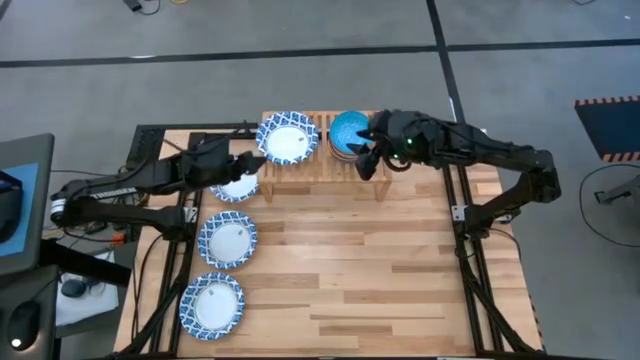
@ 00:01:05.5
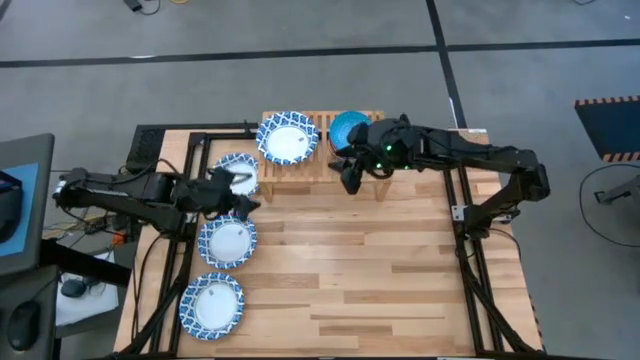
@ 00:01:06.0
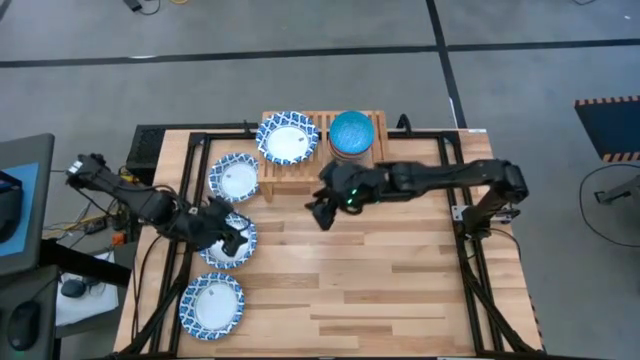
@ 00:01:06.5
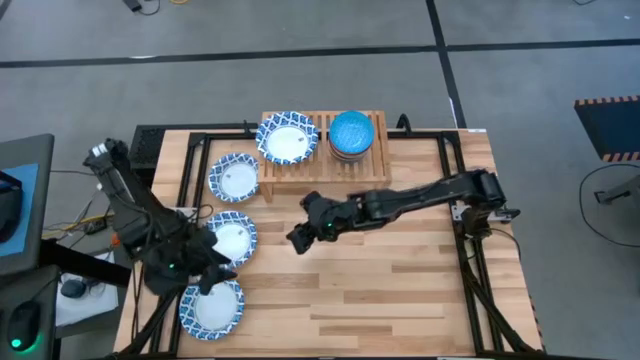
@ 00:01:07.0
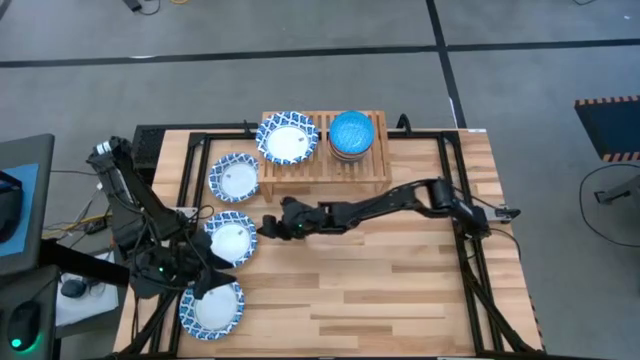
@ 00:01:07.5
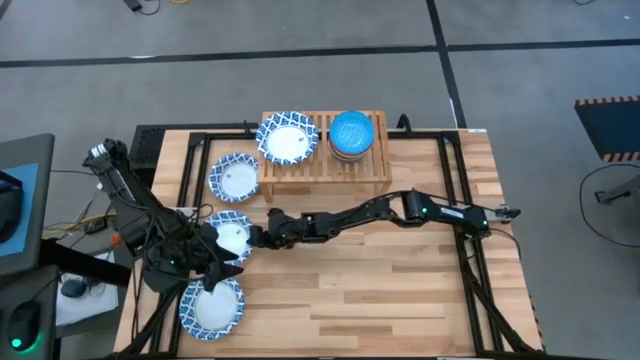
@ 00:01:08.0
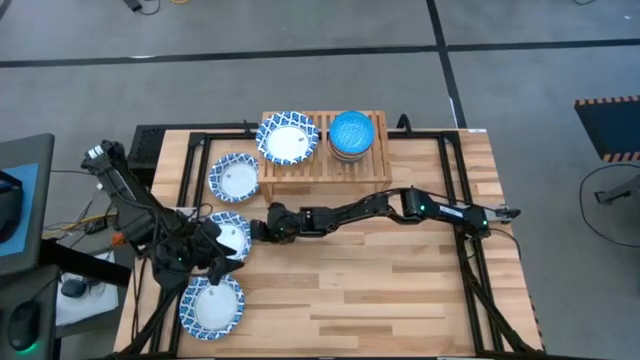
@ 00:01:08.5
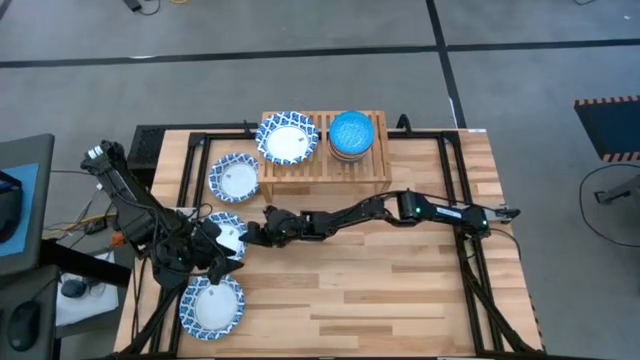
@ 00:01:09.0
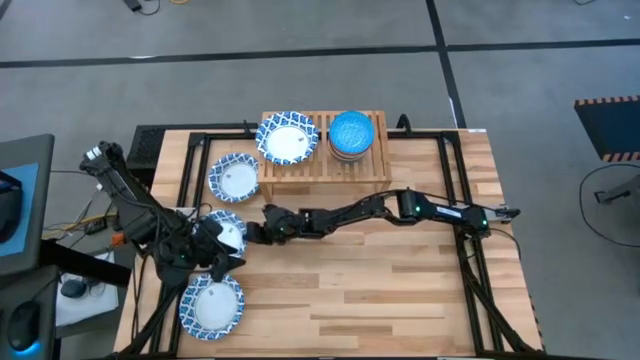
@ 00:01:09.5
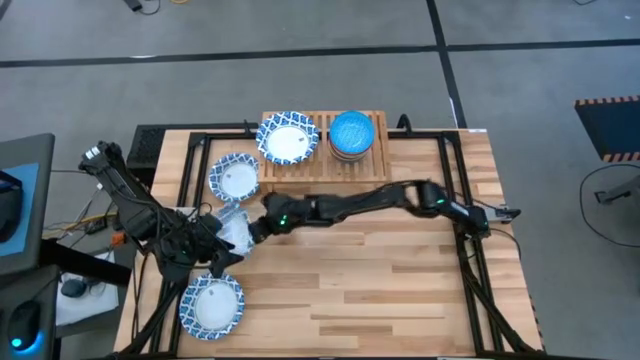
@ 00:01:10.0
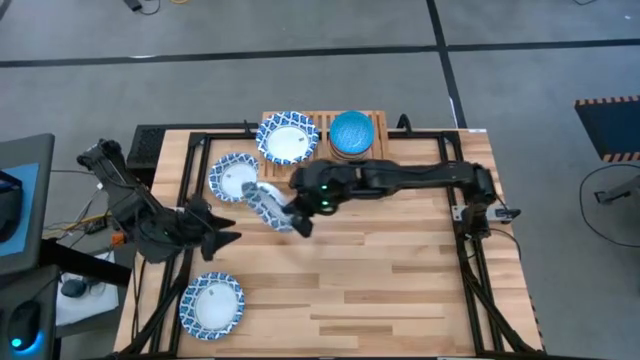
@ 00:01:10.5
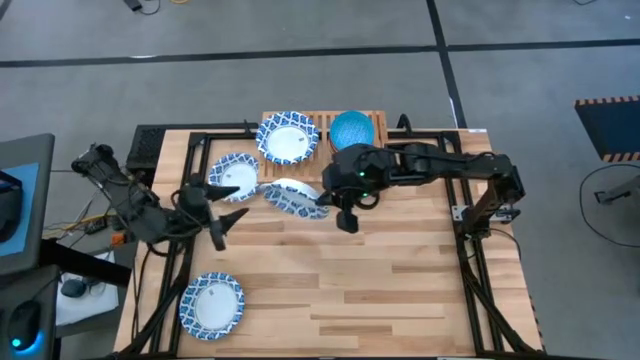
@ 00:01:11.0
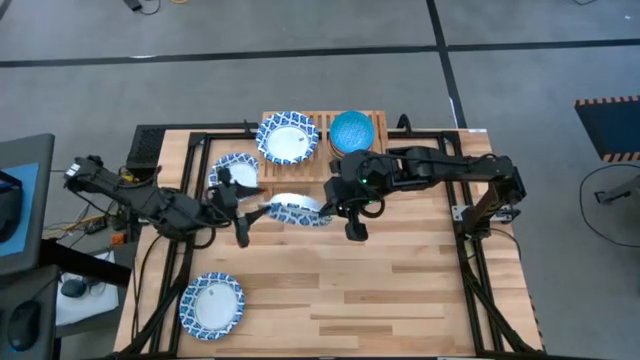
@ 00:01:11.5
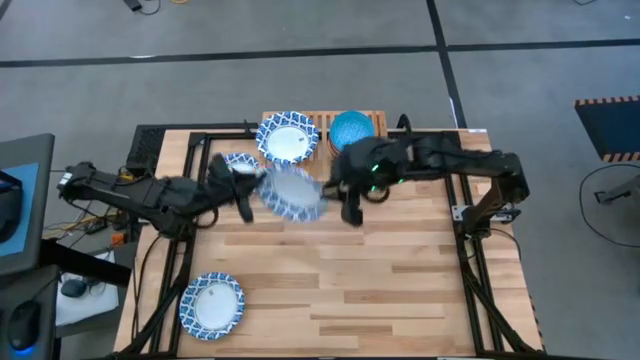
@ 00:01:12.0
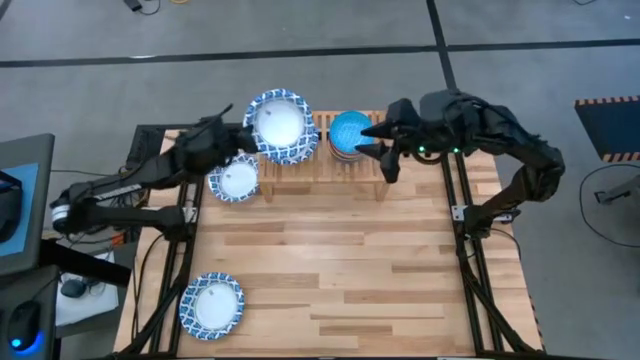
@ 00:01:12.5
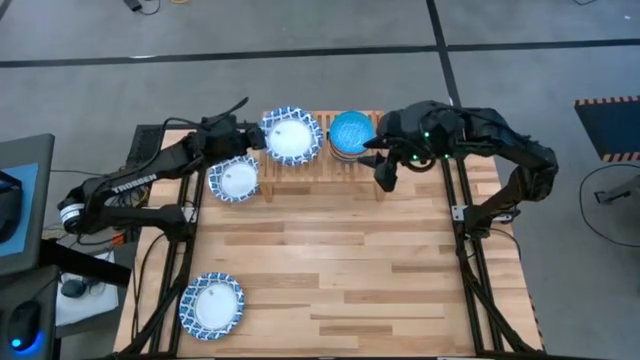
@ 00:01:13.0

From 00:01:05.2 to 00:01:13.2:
Task: Place and stack bowls onto a shelf
Stack the middle left white patterned bowl on top of the white patterned bowl on the shelf

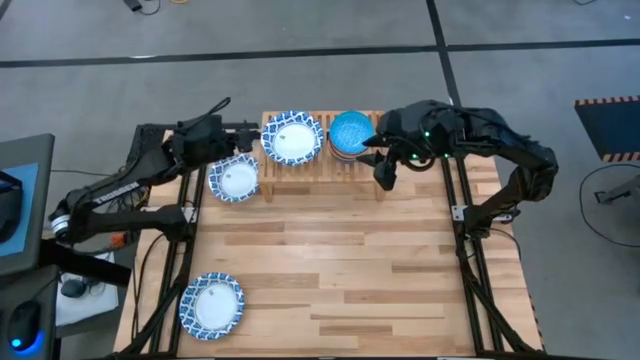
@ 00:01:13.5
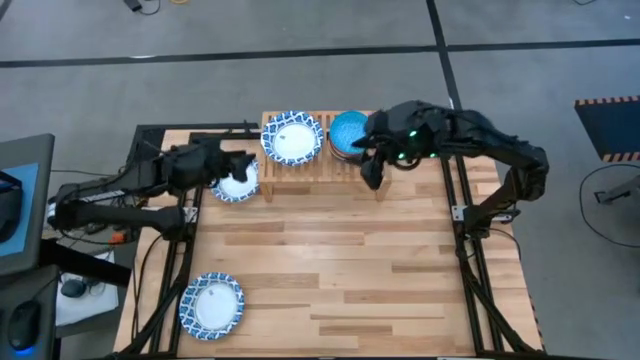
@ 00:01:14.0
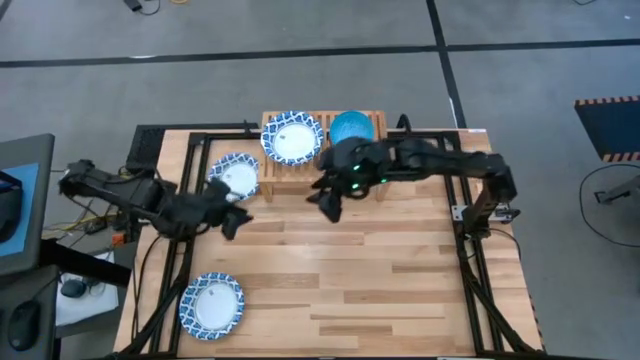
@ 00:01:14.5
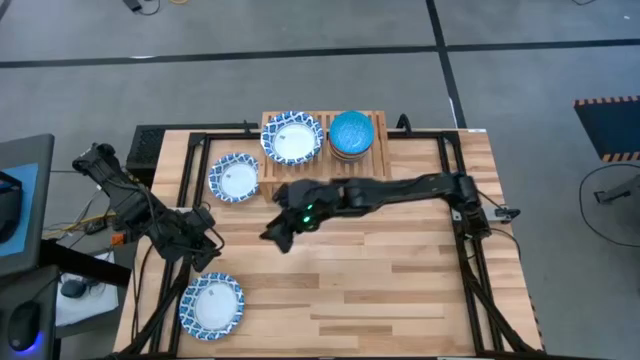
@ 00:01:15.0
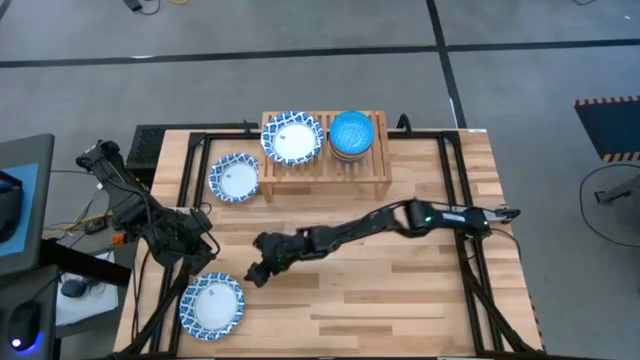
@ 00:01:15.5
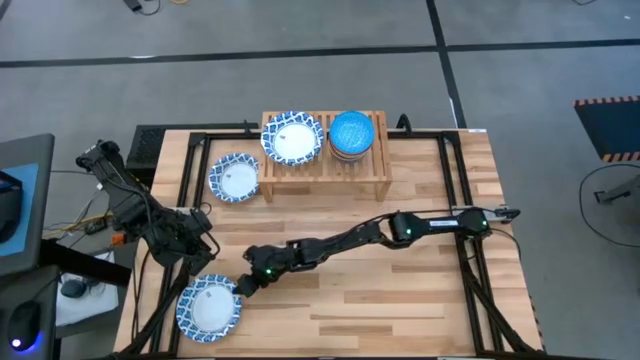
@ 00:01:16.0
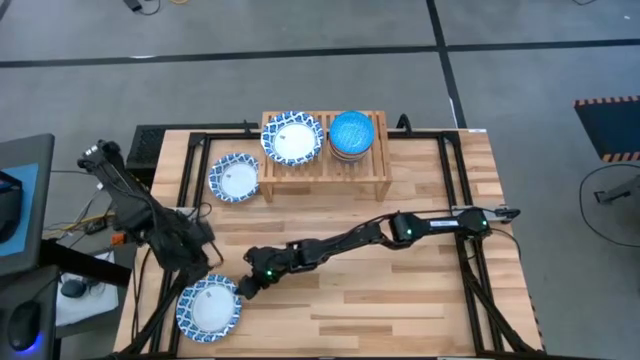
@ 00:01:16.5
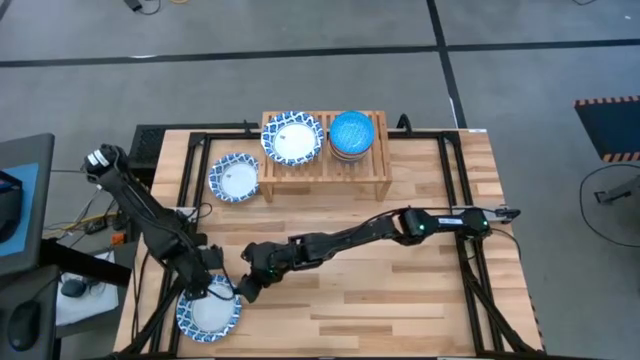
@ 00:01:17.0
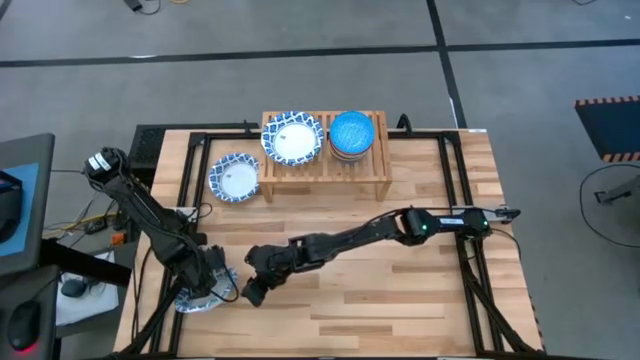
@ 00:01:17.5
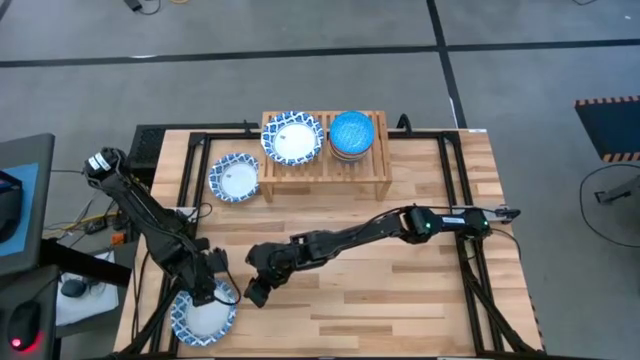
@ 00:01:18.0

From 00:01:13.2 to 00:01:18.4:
Stack the bottom white patterned bowl on top of the white patterned bowl on the shelf

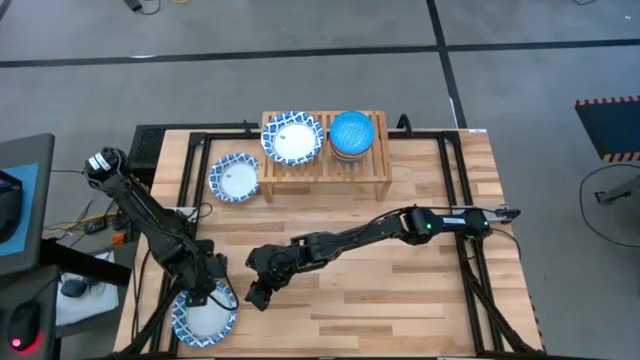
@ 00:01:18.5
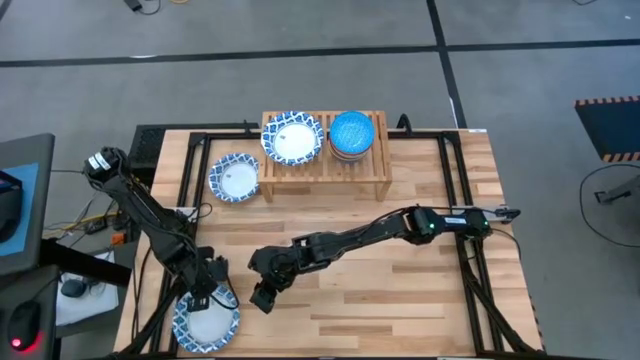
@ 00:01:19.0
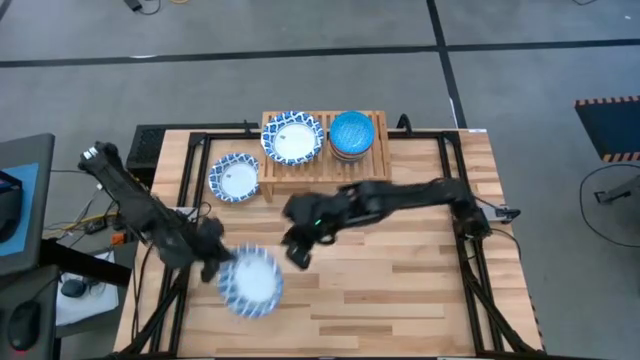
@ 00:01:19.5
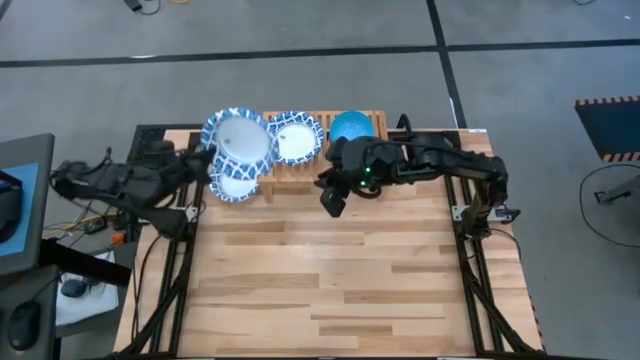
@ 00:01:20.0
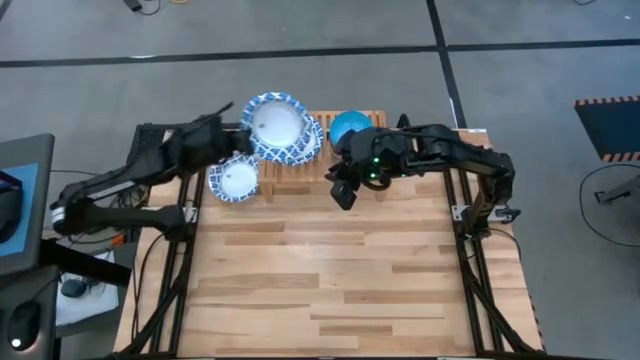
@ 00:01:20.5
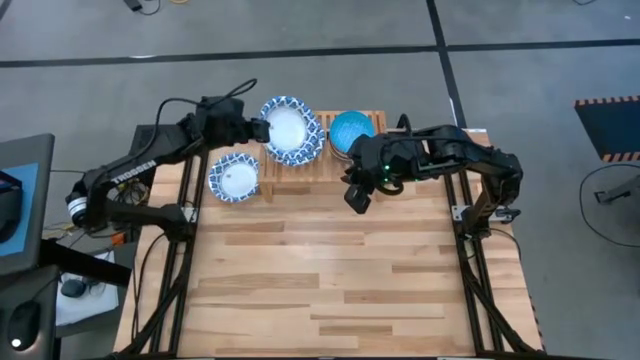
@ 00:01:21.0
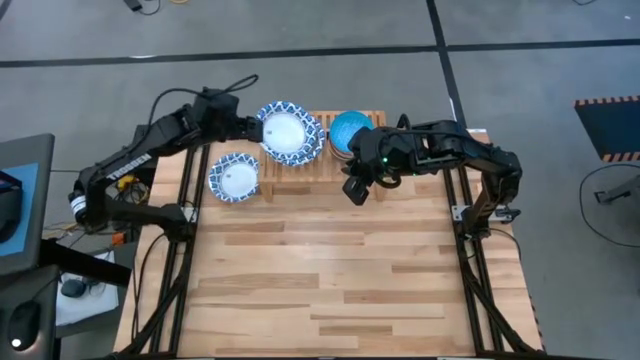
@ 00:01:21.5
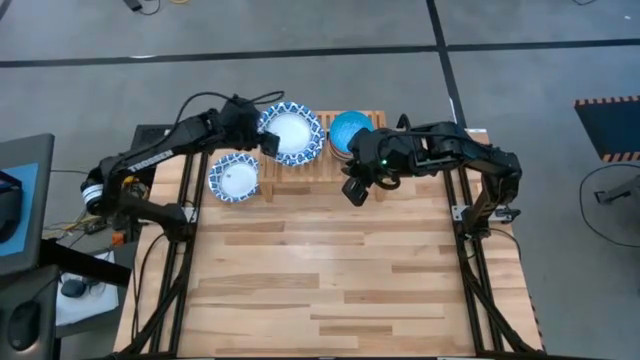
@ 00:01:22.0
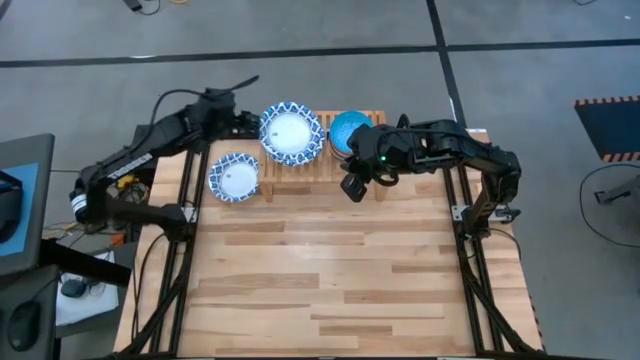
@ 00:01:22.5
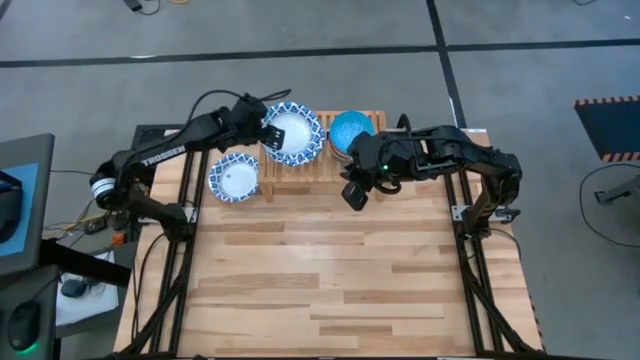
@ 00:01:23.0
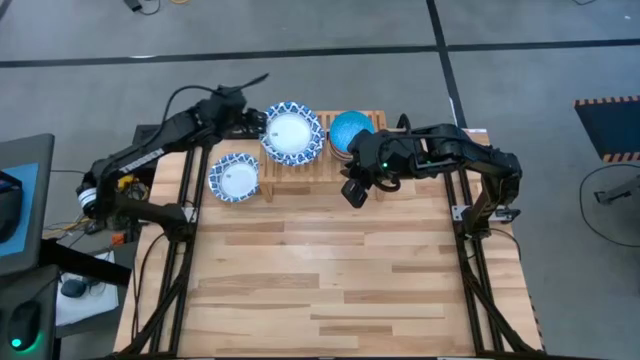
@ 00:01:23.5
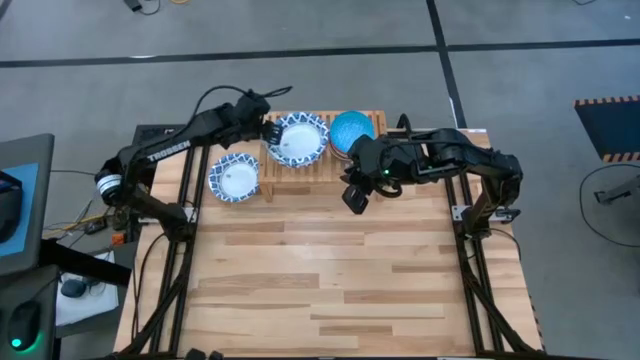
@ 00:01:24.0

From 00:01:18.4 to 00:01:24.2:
Stack the bottom white patterned bowl on top of the white patterned bowl on the shelf

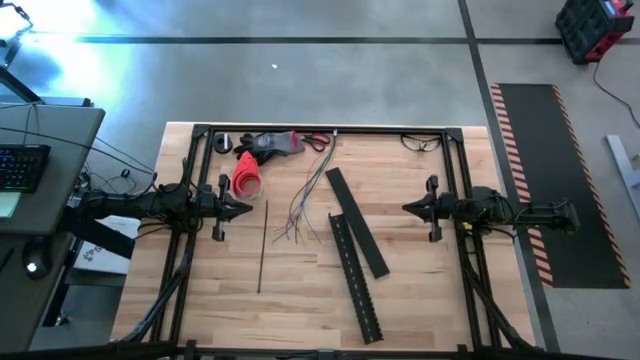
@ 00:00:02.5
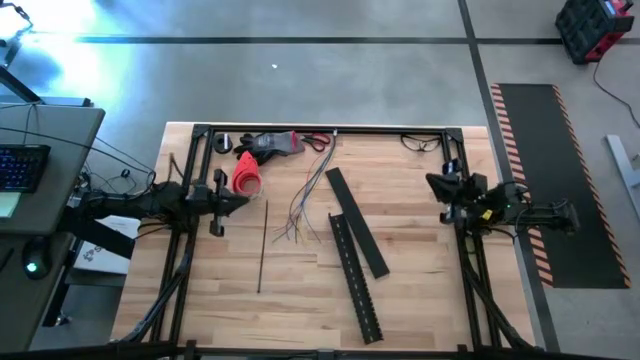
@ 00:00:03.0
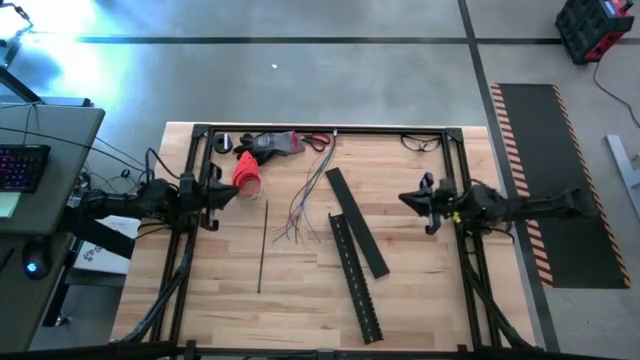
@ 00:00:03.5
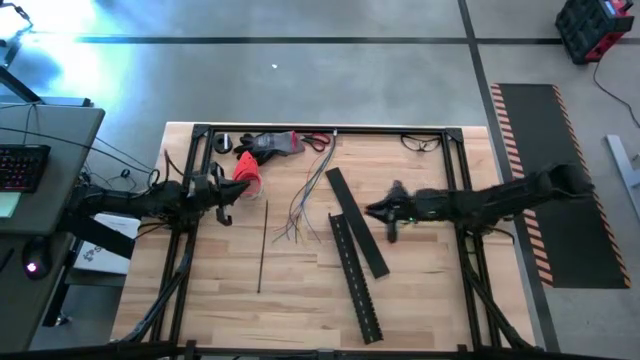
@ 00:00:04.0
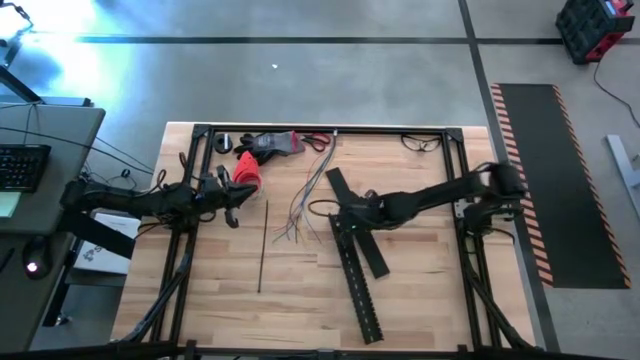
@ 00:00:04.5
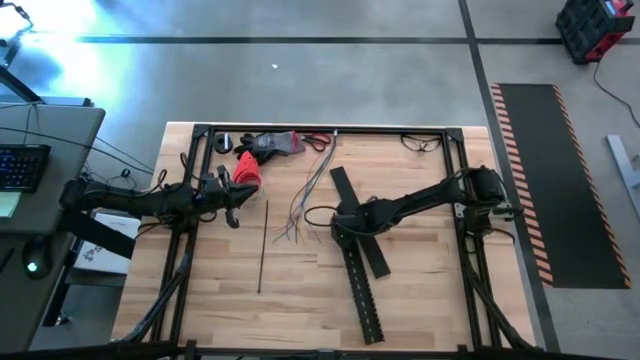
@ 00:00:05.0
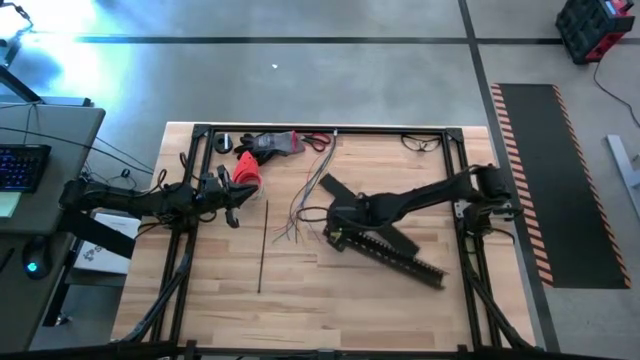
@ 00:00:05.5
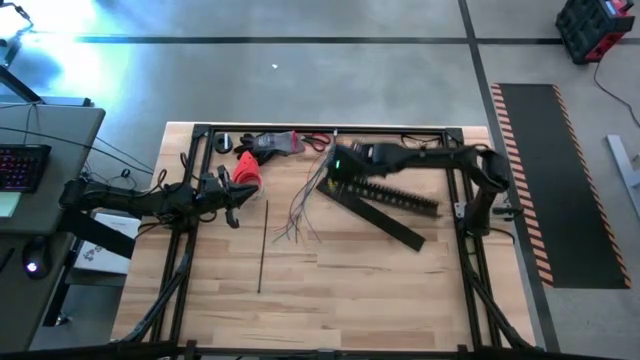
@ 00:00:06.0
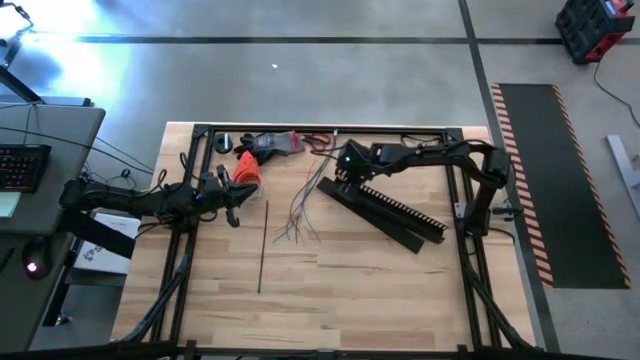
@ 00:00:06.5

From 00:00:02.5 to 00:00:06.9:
Task: Ziptie cables
Move the black cable duct to the middle right of the table
